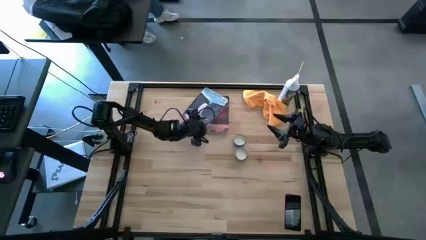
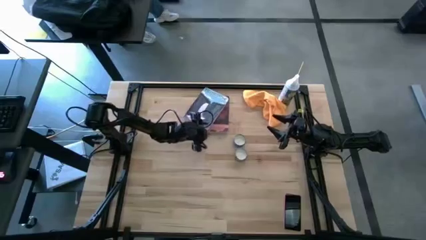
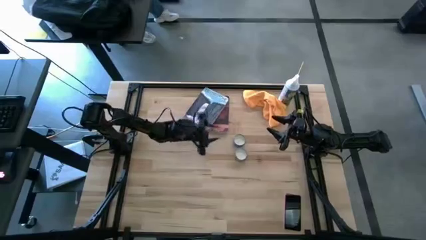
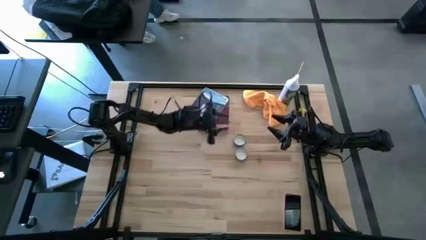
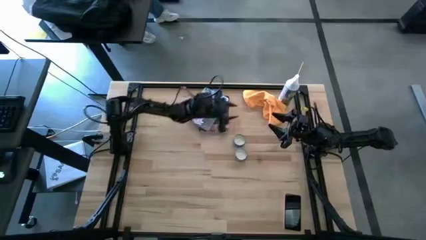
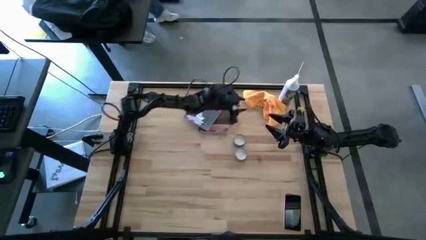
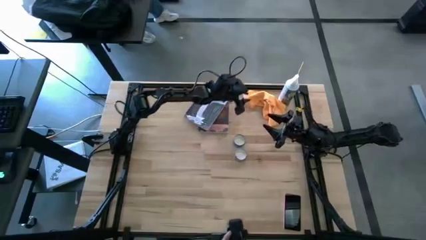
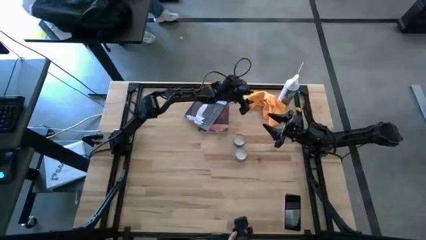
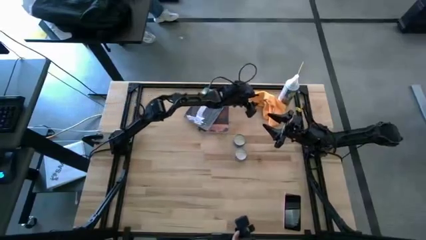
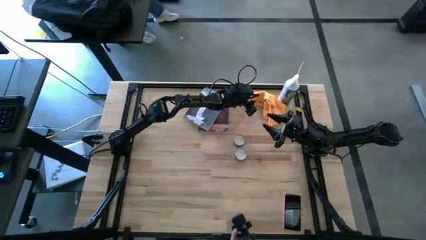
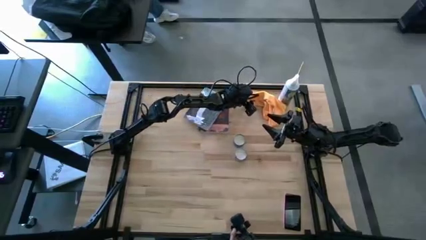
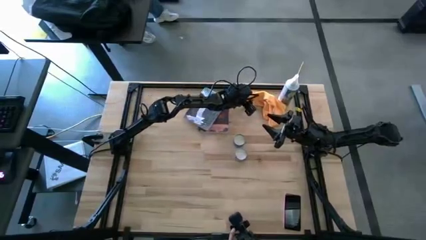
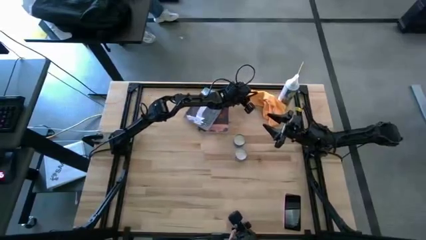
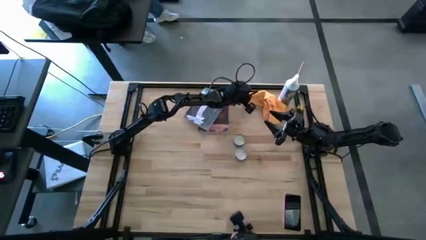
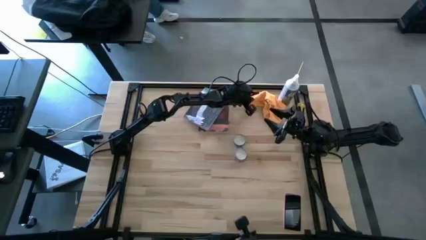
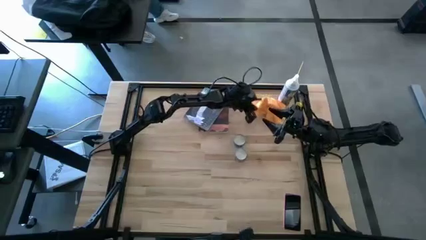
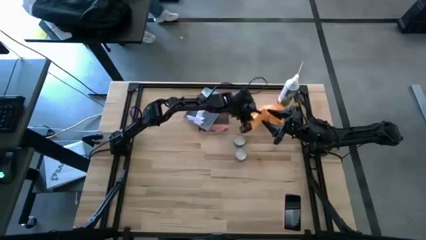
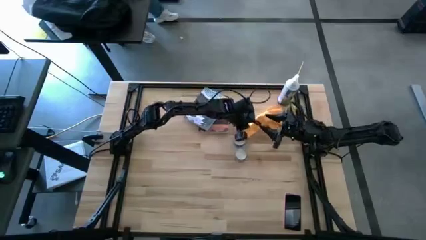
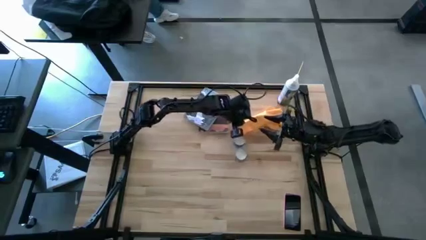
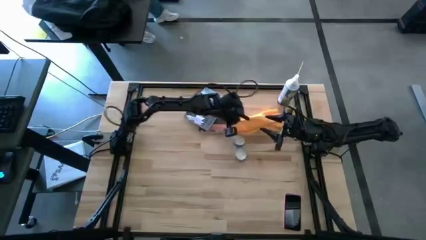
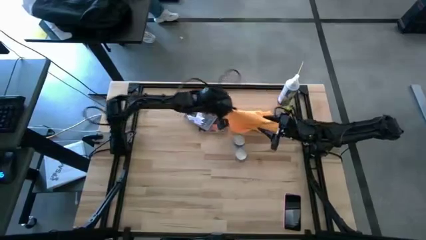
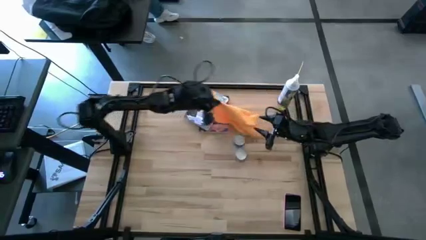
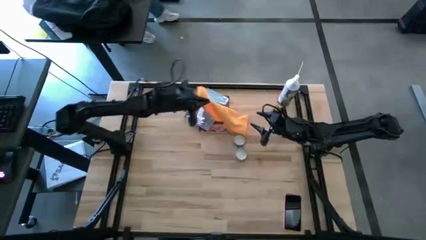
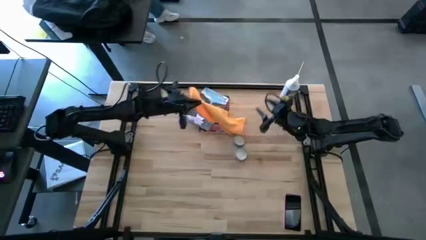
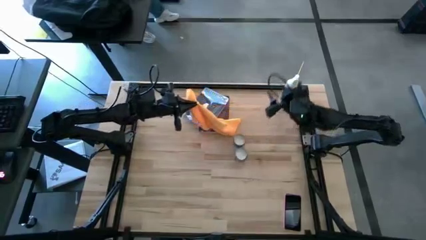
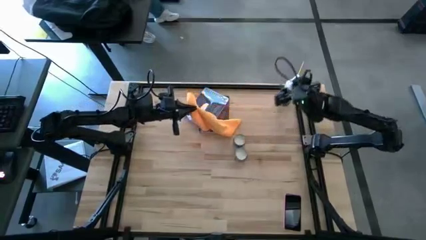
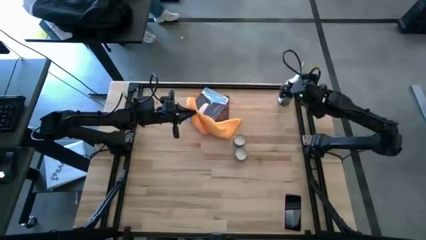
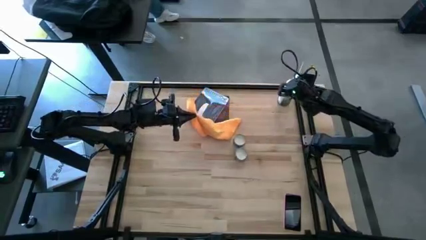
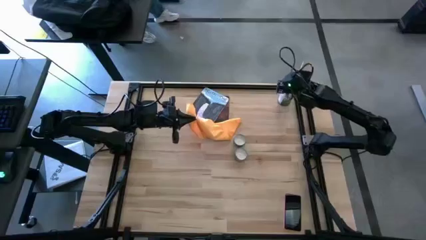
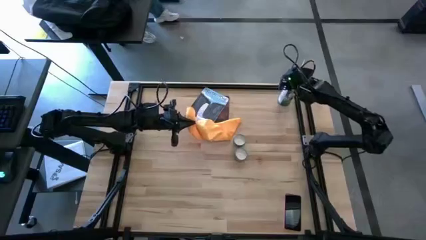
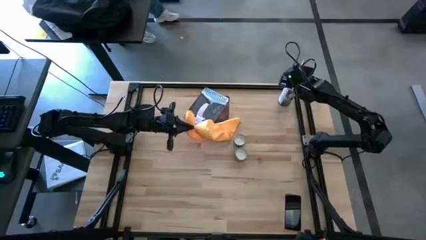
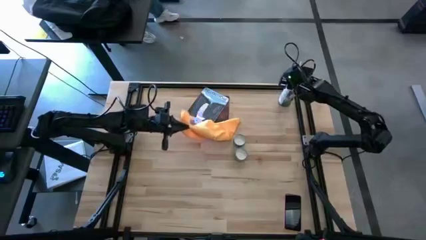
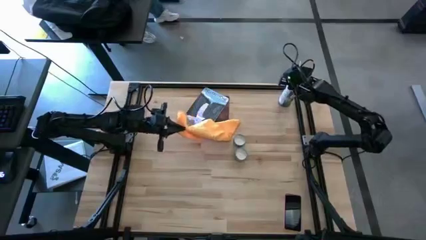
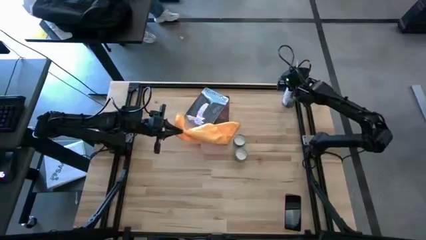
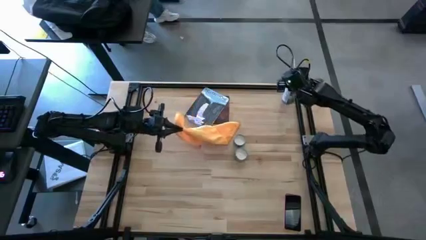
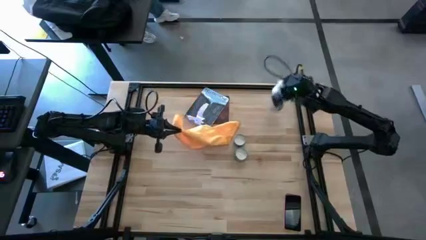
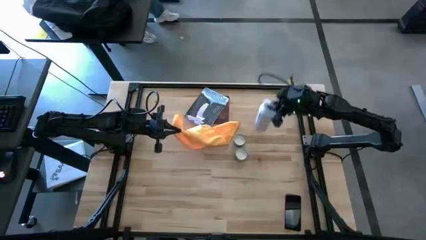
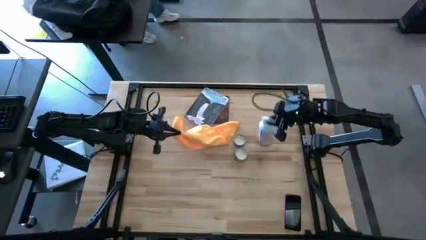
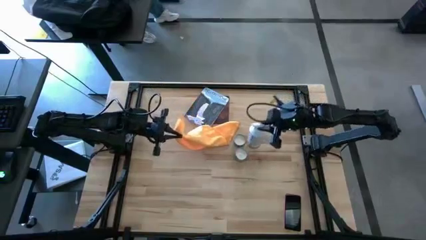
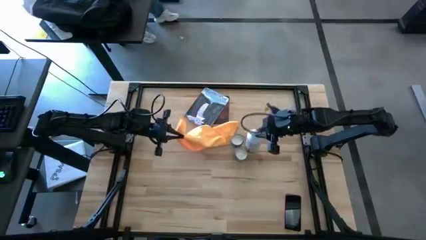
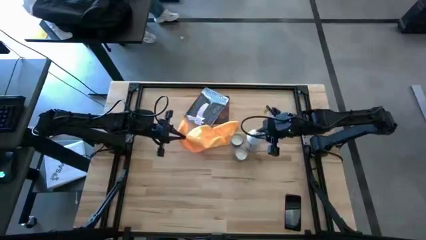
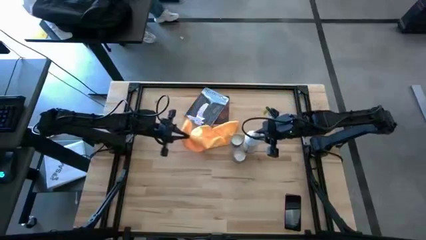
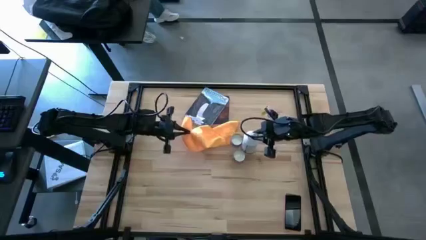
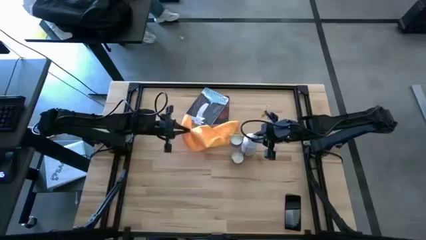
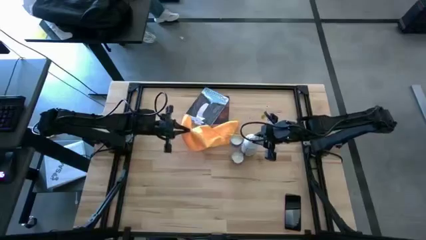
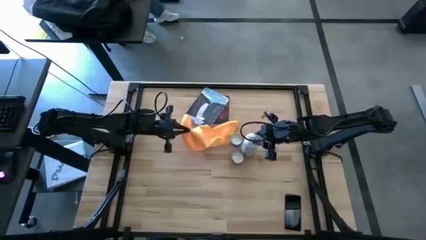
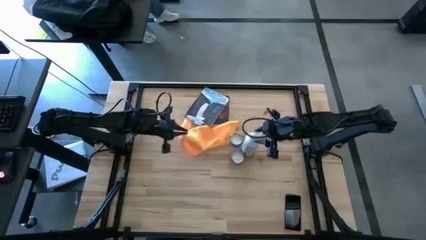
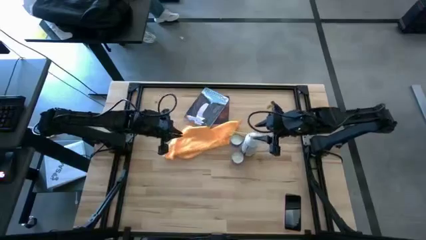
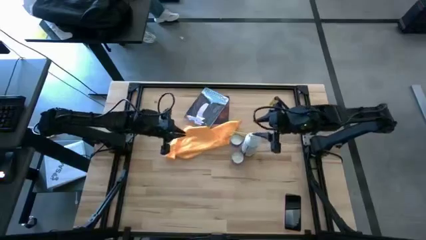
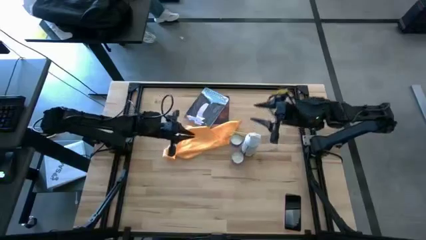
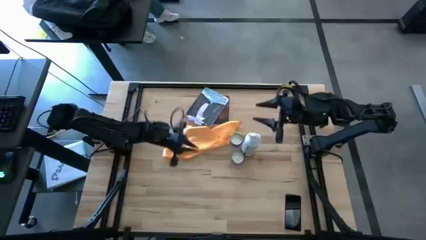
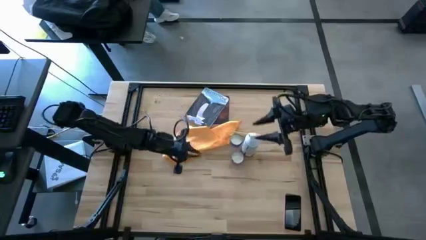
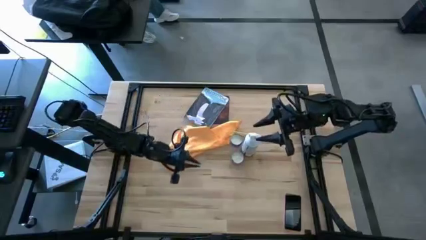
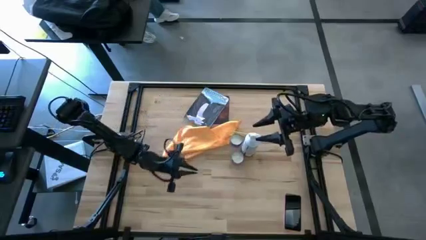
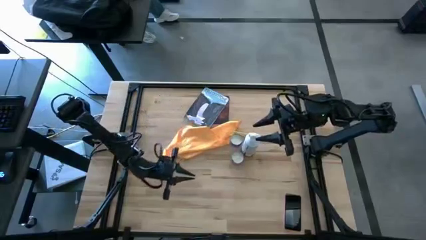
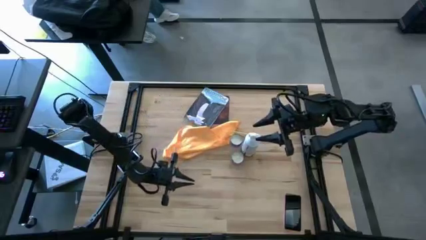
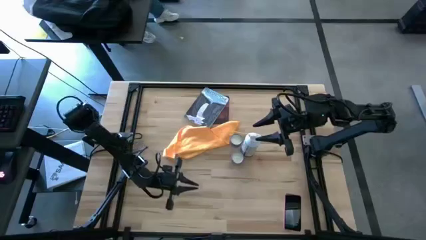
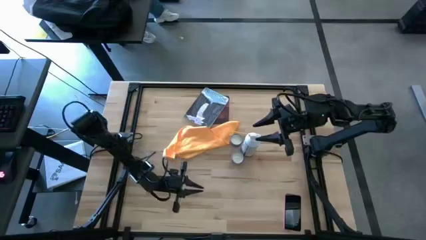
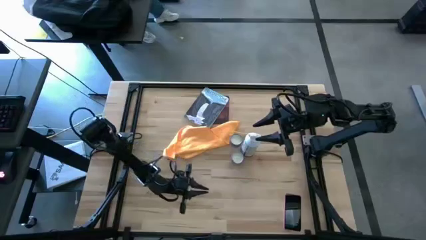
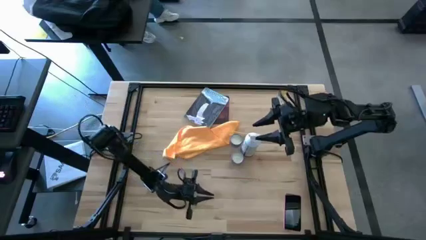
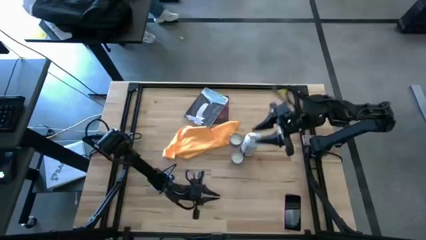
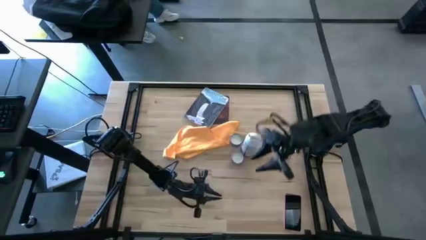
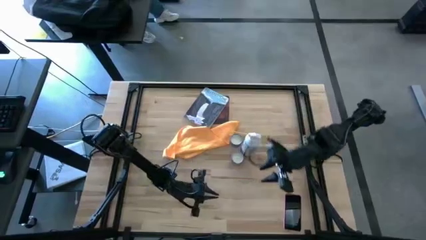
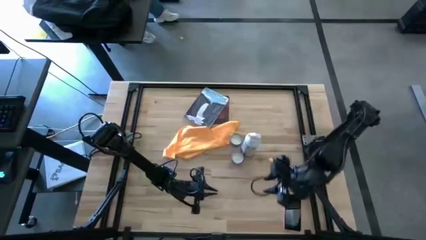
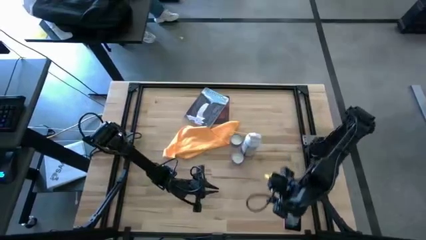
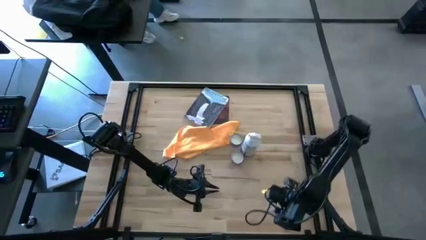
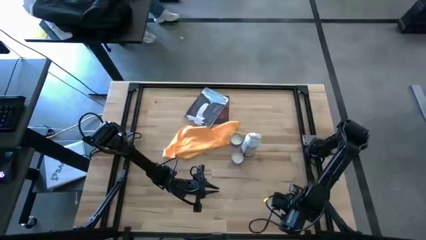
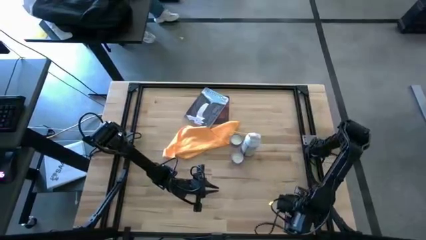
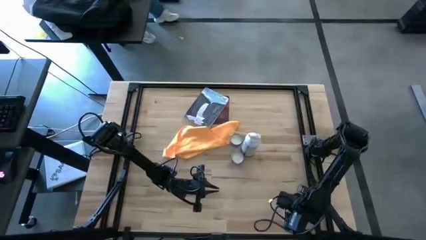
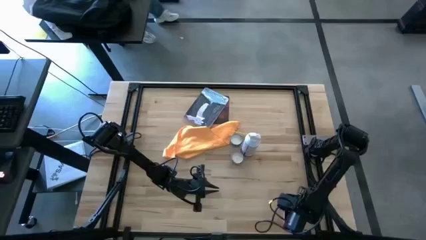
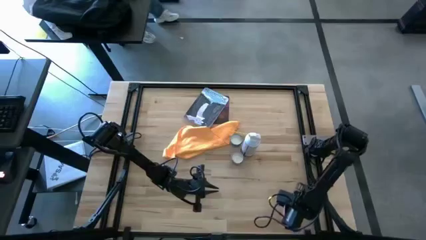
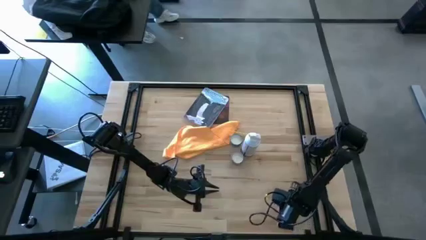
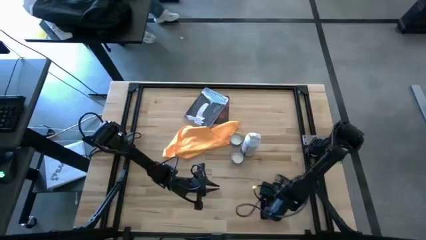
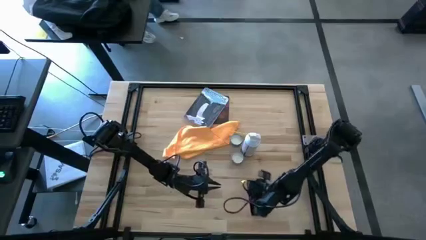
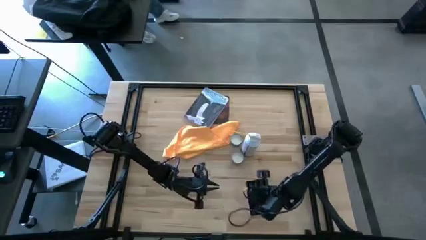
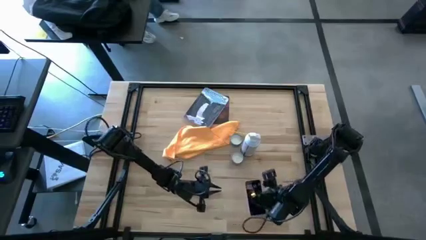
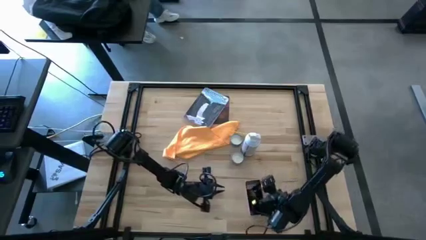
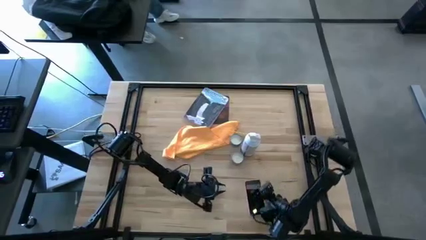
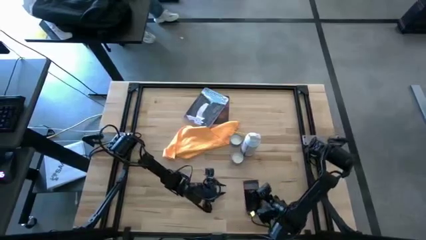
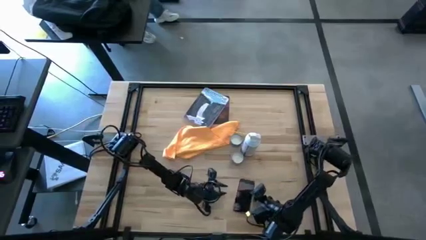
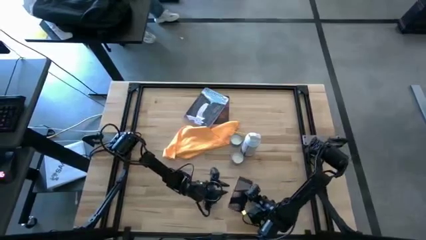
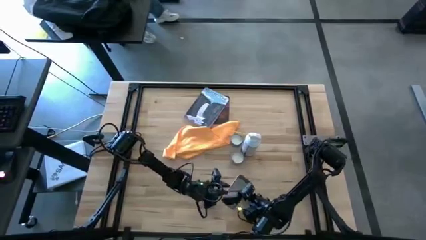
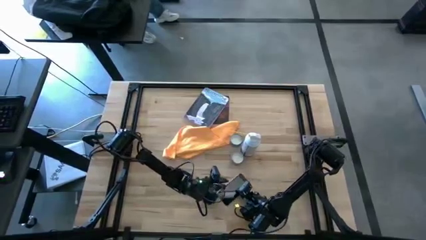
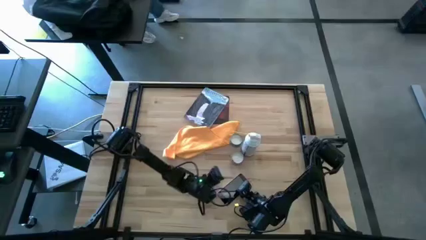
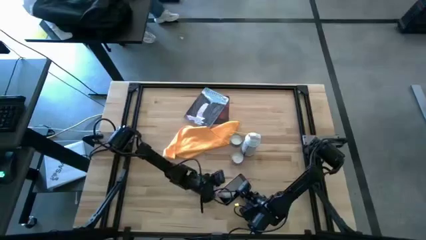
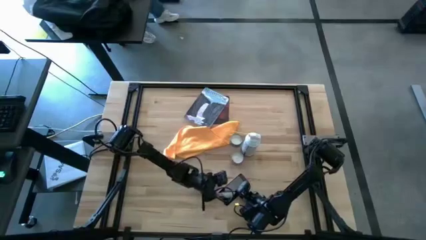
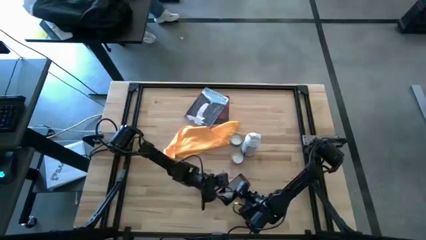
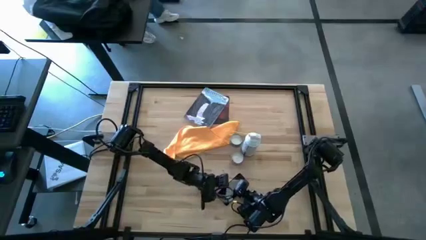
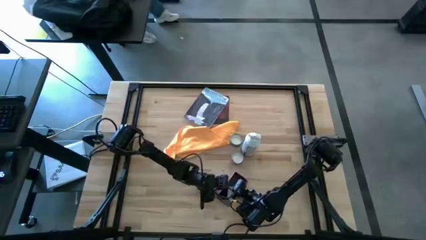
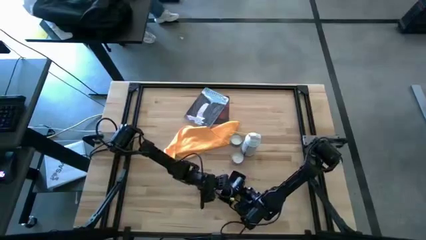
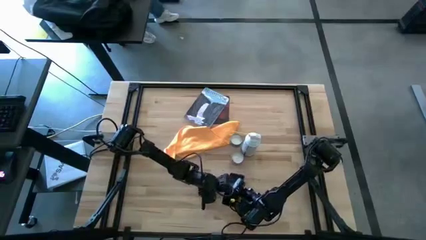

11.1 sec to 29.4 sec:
Task: Apply microfiber cloth
Spray the pink phone using the white spray bottle
